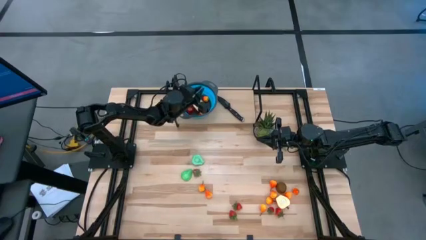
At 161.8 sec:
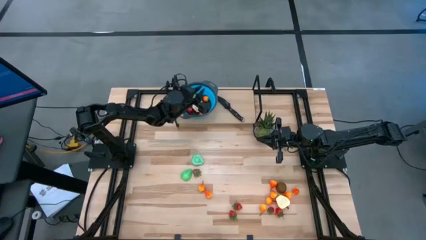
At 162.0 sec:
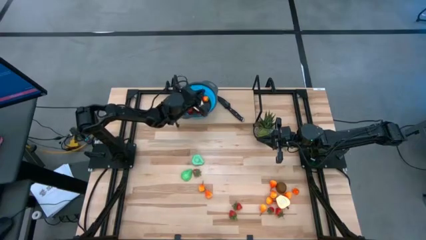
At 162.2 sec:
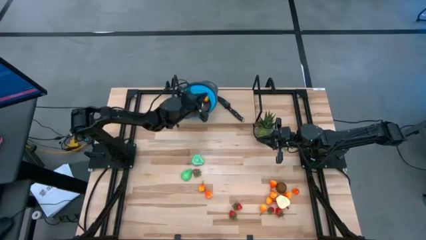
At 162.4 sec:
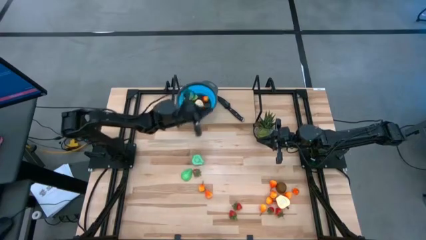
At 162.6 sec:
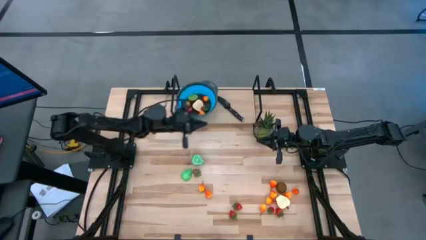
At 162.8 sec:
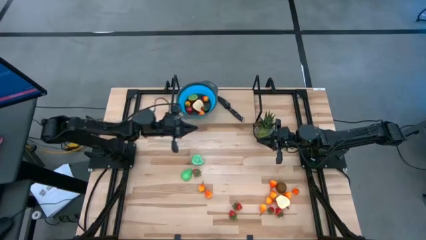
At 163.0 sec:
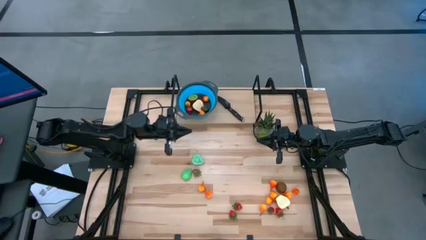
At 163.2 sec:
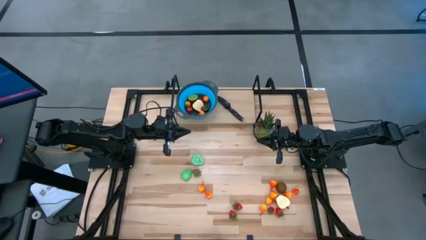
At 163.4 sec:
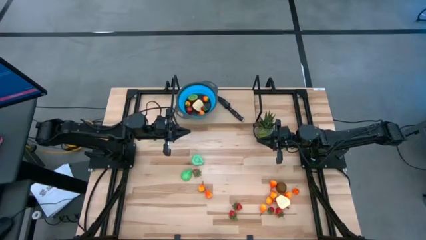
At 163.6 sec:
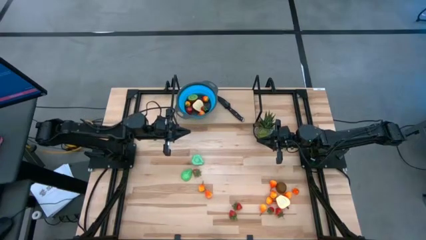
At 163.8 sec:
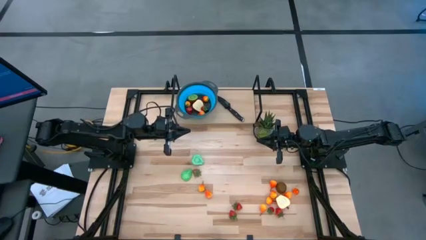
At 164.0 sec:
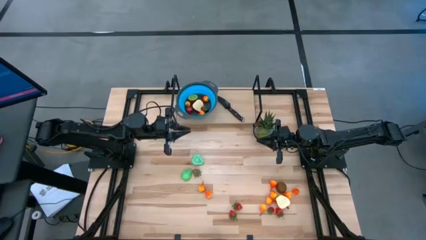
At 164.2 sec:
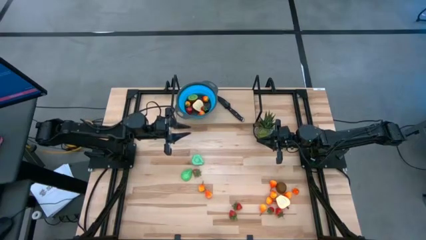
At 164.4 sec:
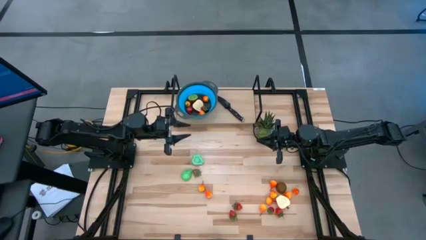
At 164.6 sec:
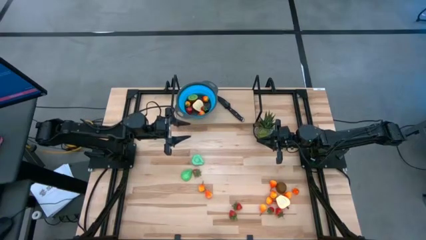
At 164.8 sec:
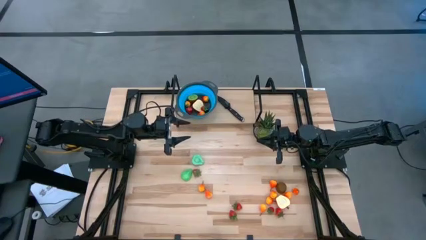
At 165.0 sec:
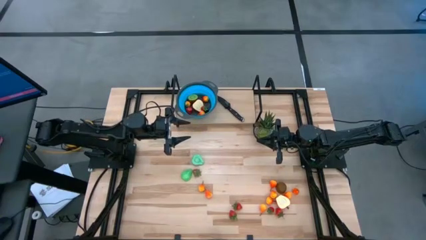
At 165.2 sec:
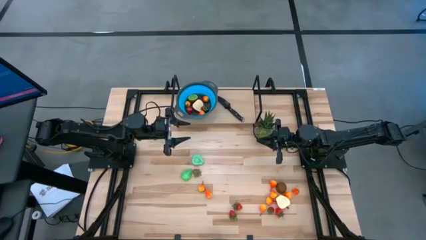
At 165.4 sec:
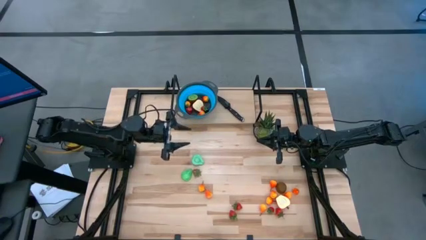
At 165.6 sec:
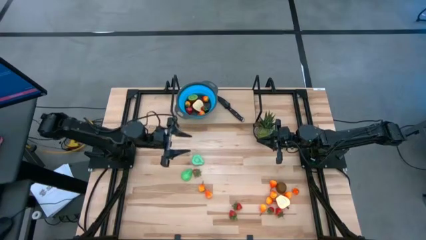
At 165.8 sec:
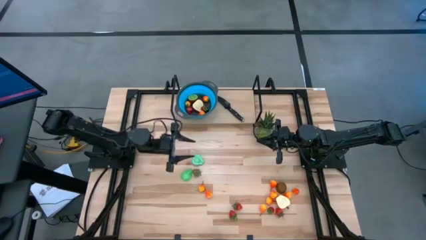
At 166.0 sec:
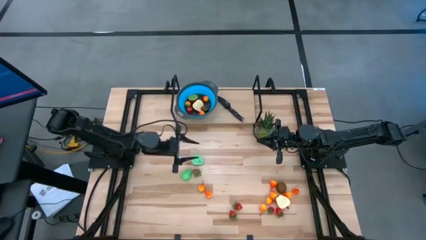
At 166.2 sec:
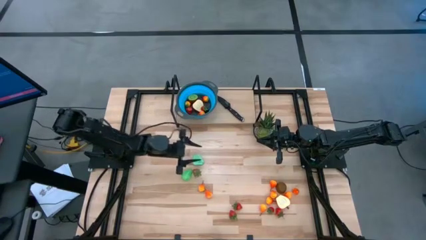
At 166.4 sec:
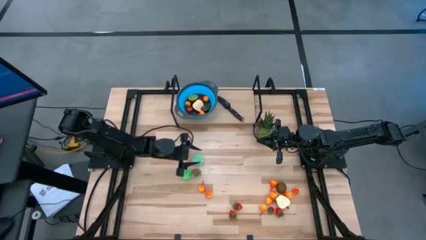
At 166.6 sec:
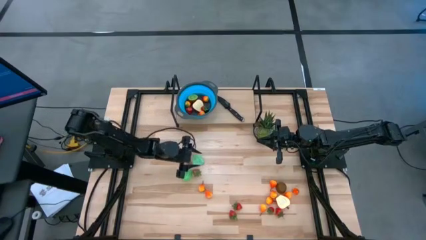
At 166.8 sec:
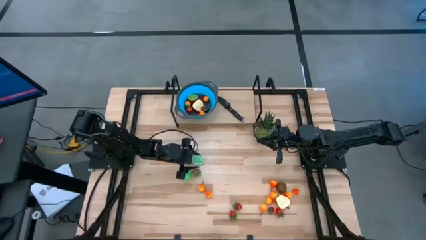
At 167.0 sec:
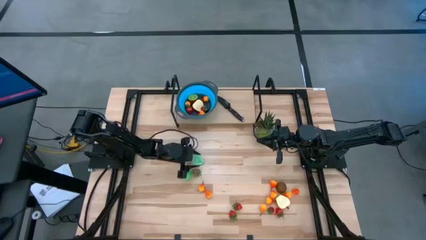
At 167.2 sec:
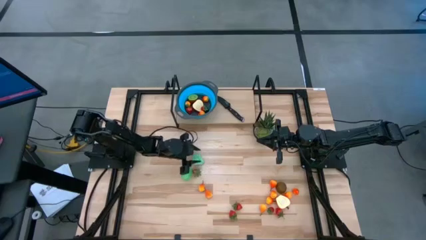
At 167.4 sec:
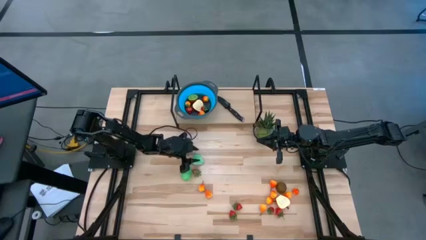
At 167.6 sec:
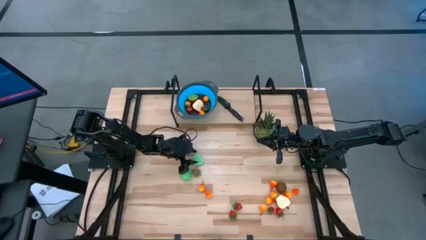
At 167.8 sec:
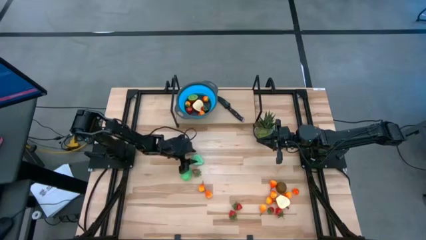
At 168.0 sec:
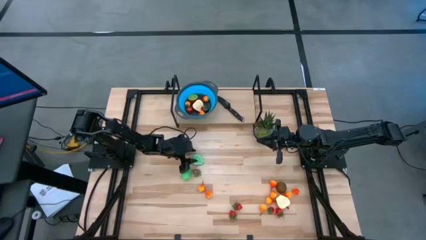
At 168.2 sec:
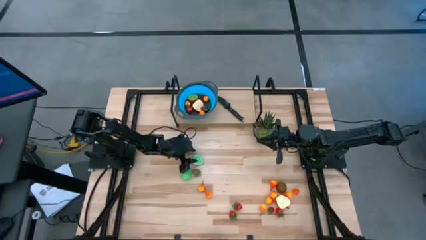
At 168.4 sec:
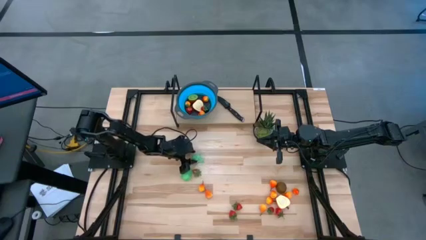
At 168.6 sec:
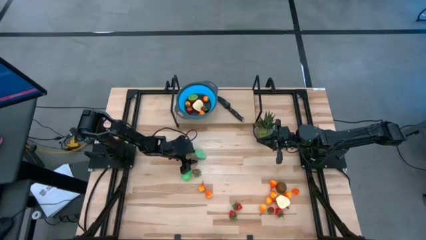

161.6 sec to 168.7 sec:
Task: Pick & Place Fruit
Put the avocado into the basket

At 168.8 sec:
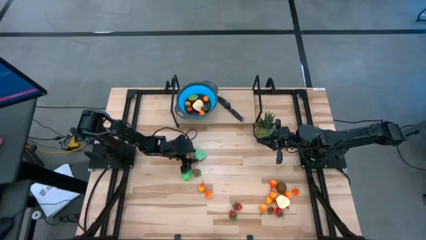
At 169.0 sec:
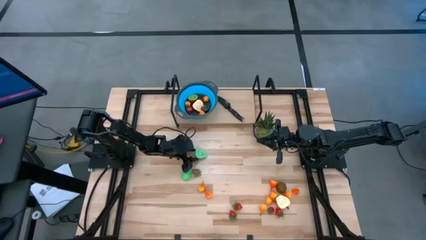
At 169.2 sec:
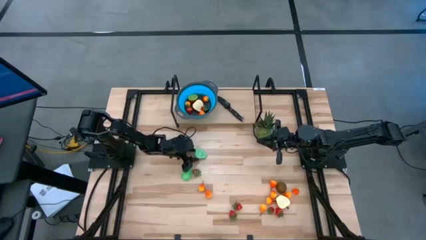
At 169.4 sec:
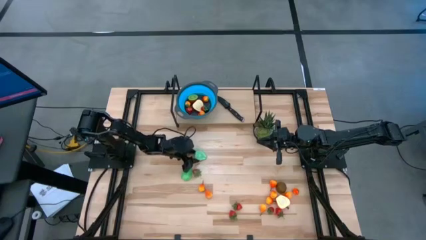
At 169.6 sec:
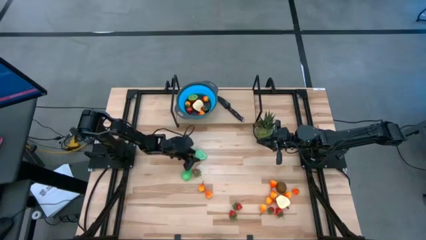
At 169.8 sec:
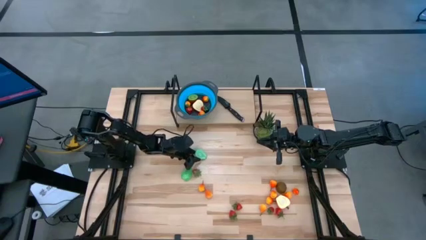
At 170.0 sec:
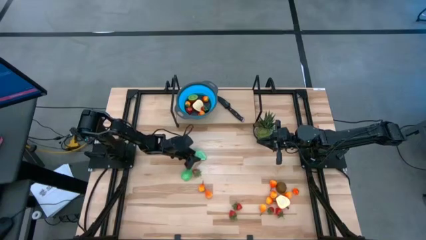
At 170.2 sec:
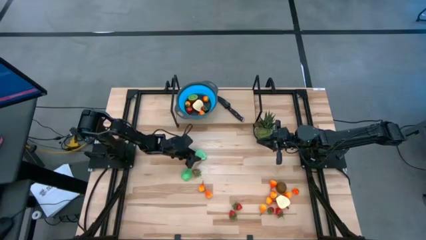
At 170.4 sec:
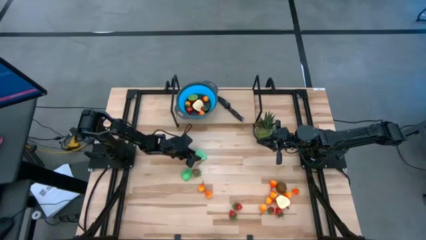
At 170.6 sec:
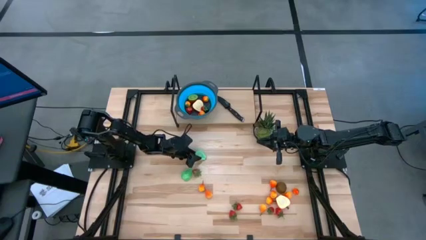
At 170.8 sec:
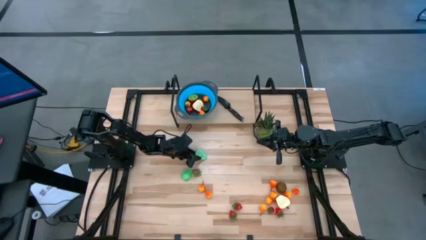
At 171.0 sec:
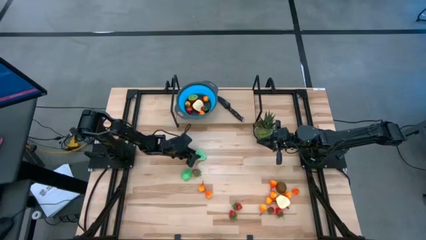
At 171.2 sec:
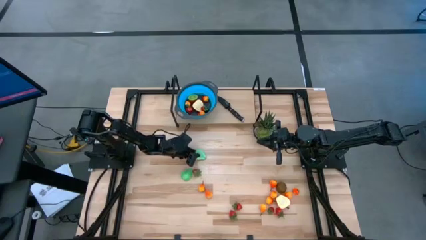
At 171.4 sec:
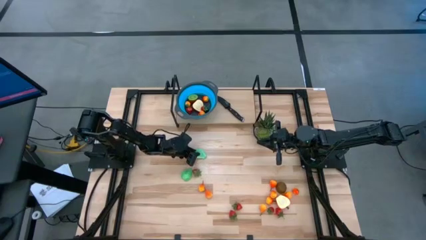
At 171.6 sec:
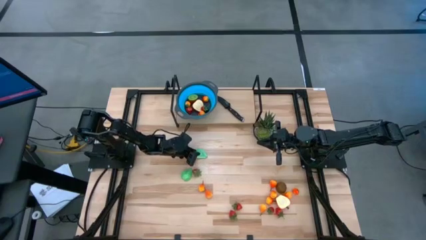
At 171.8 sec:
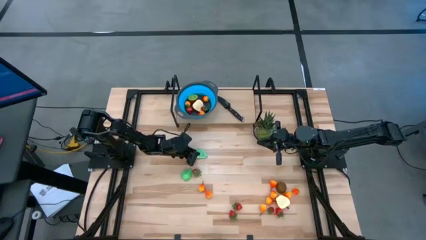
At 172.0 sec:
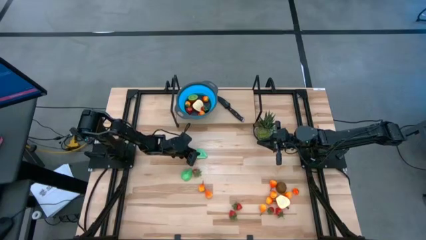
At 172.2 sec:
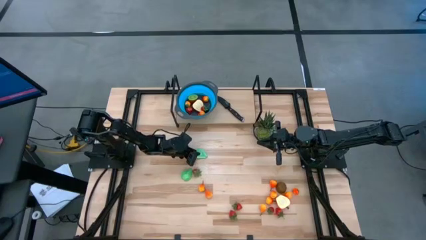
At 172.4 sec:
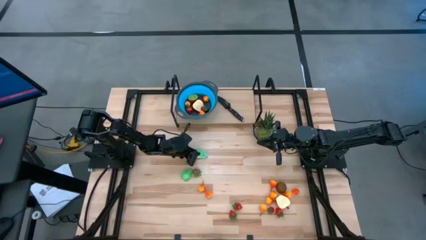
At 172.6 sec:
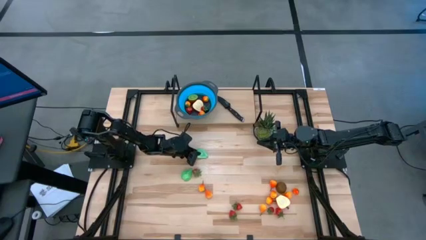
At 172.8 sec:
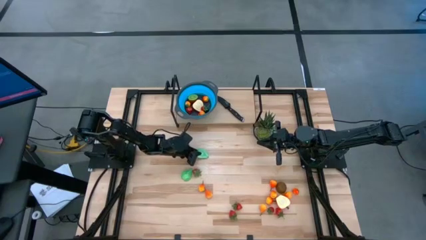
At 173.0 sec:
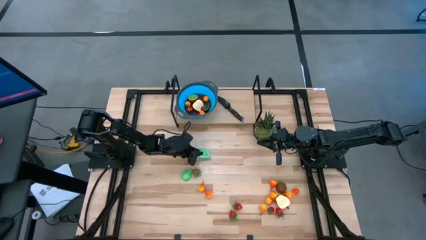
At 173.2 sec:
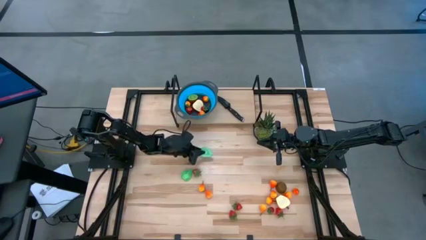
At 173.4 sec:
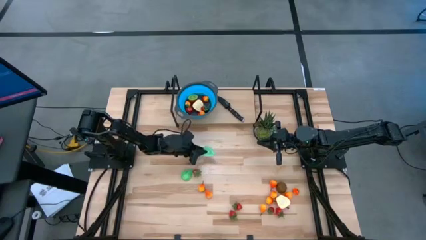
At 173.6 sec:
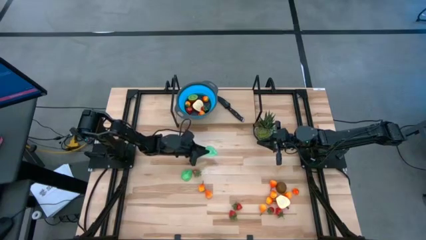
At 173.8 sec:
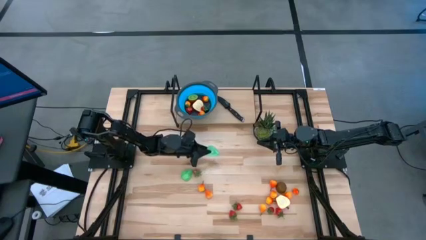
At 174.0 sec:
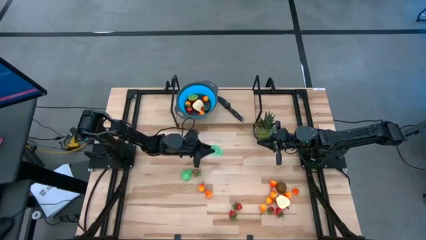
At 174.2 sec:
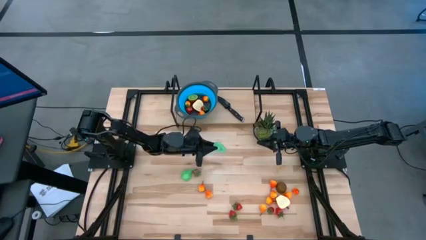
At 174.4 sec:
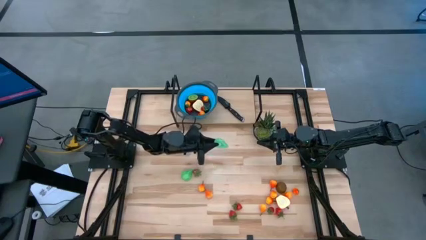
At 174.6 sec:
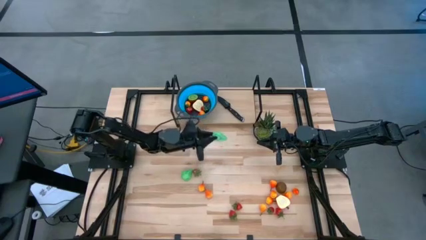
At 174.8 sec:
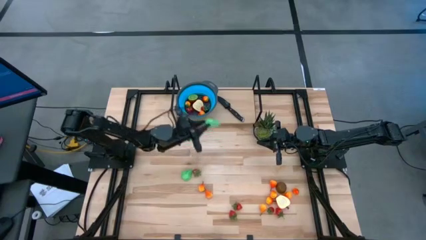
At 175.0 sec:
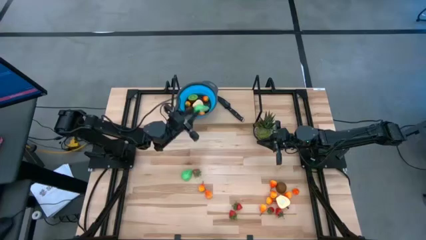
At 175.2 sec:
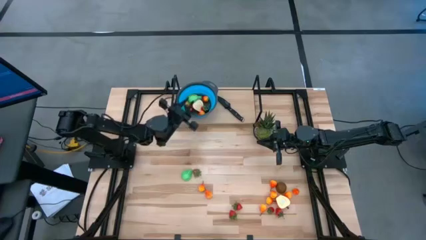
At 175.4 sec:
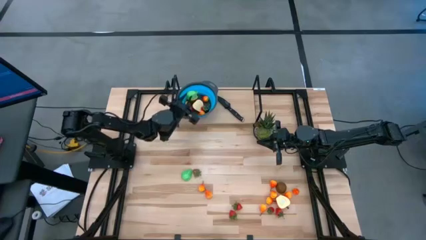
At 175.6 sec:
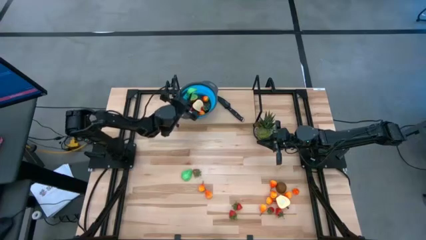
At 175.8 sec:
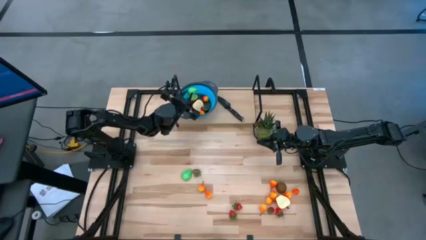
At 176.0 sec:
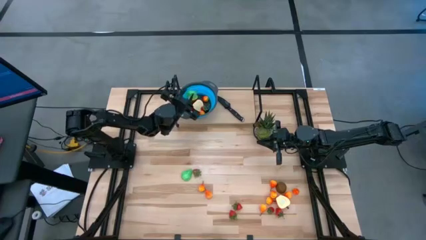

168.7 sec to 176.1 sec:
Put the avocado into the basket

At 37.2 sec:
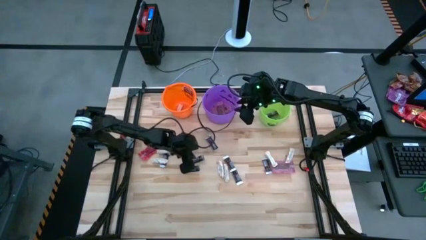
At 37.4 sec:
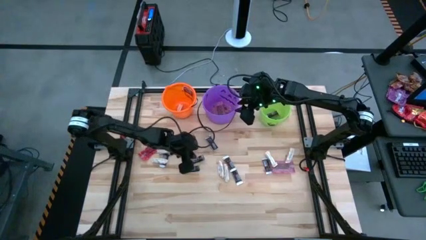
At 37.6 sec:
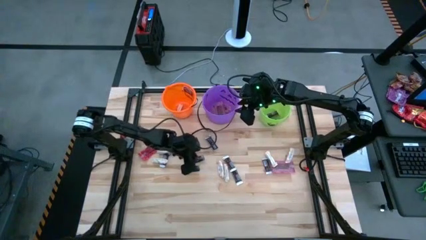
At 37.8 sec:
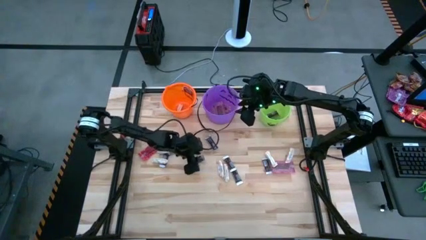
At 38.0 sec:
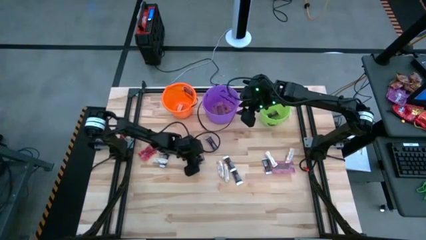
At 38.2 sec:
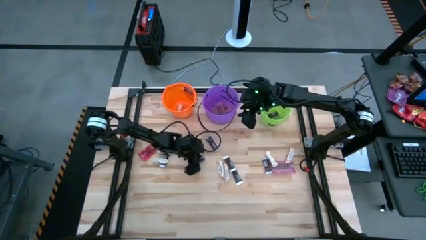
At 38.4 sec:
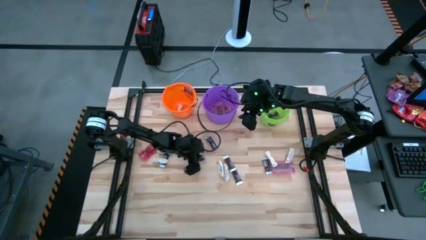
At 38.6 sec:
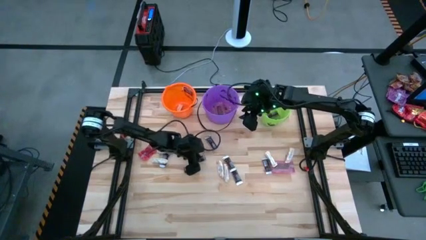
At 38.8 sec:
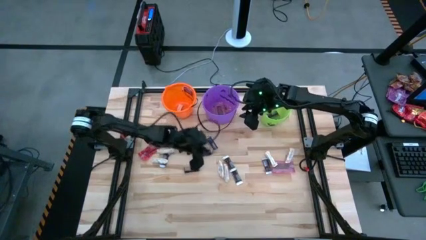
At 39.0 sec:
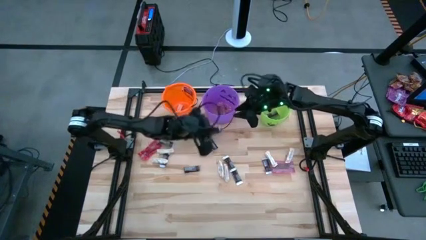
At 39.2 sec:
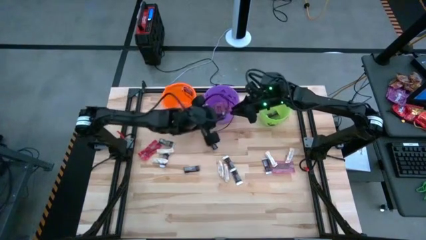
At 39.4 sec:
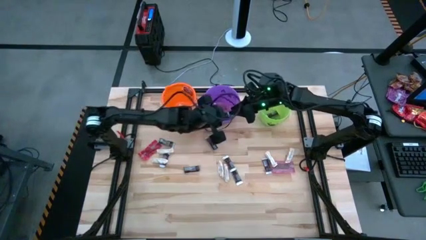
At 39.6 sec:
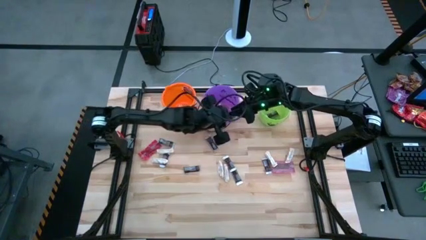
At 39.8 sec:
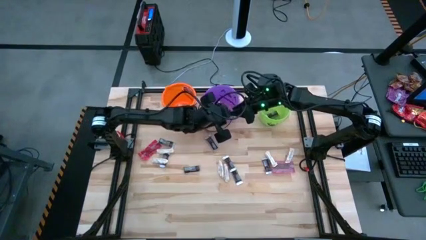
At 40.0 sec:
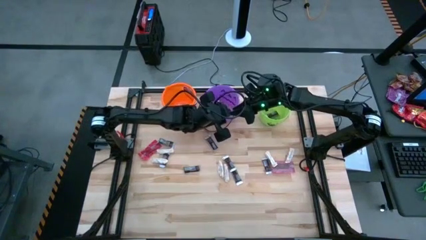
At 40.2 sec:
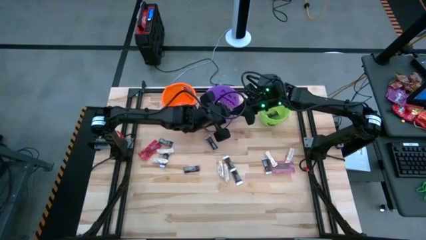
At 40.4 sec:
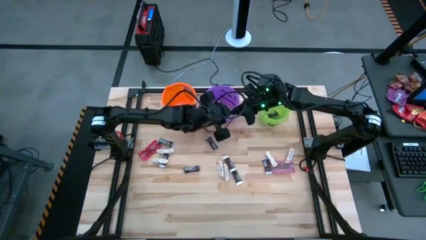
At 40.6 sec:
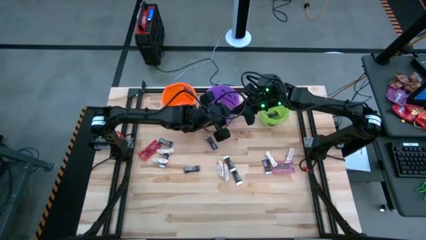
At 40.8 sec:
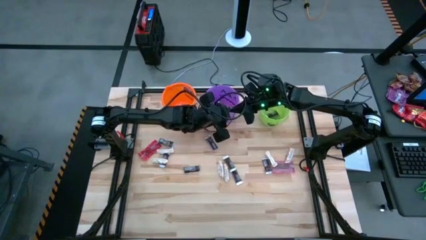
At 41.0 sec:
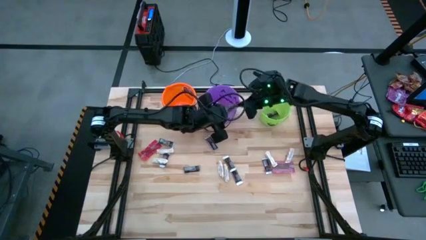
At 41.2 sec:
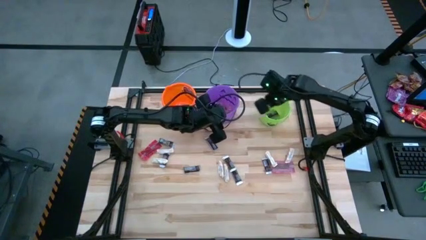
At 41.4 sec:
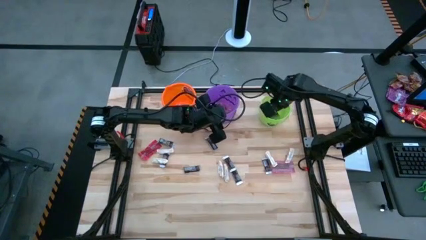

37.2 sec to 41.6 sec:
Task: Sort candy by brand, put in halloween buckets
Put the brown chocolate bar into the green bucket
